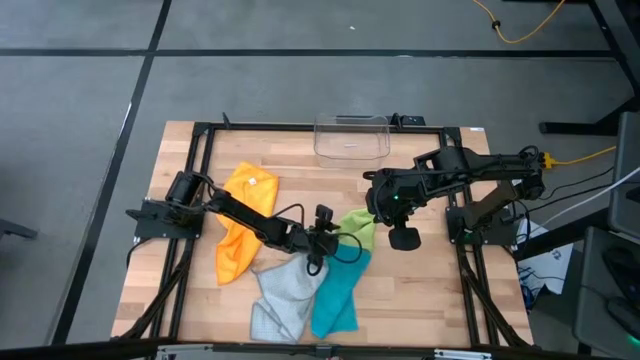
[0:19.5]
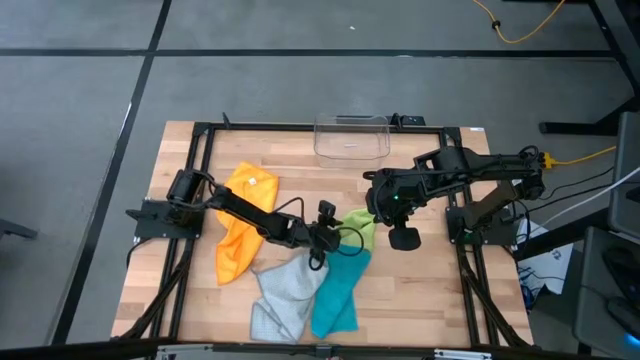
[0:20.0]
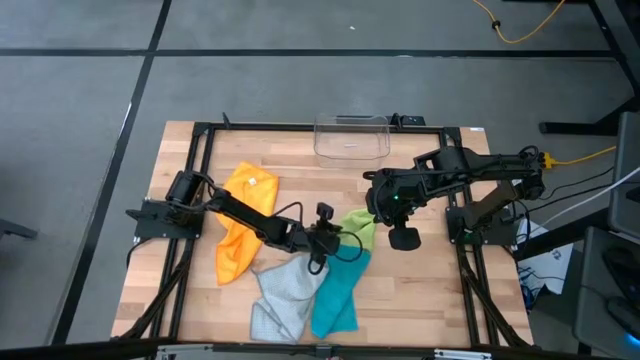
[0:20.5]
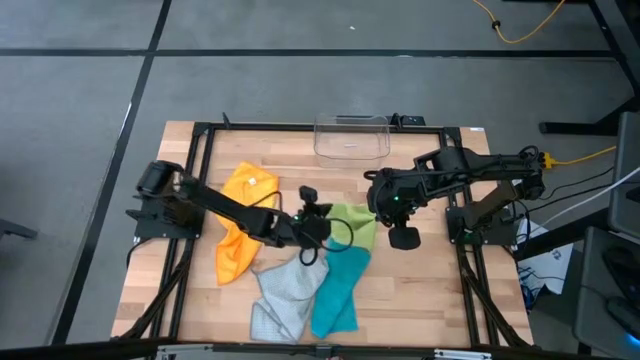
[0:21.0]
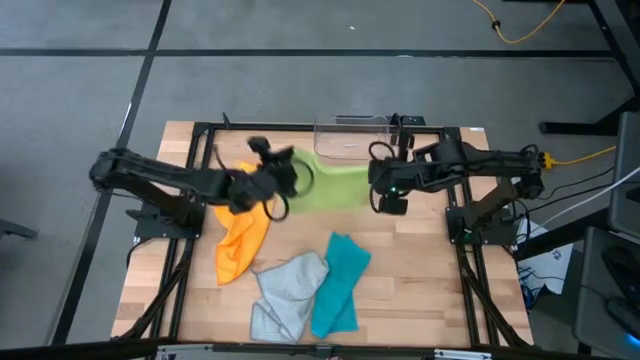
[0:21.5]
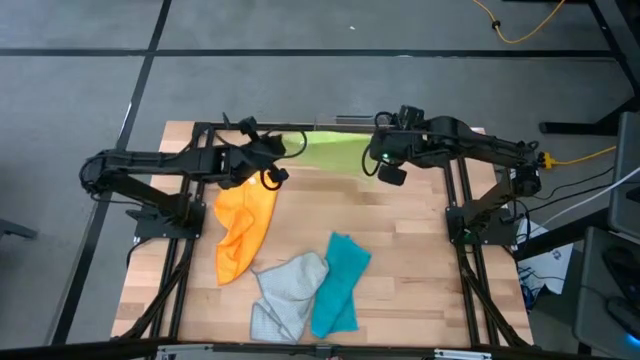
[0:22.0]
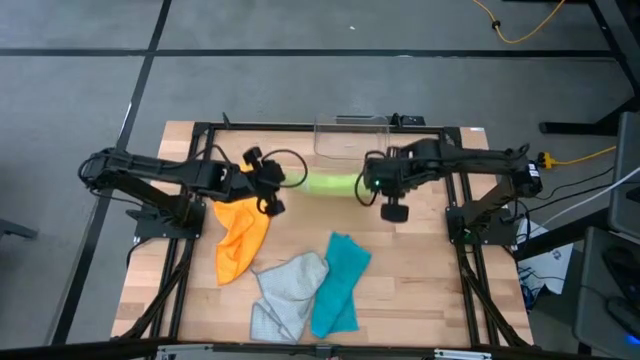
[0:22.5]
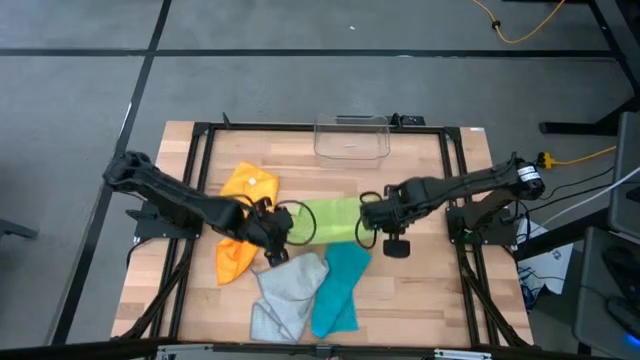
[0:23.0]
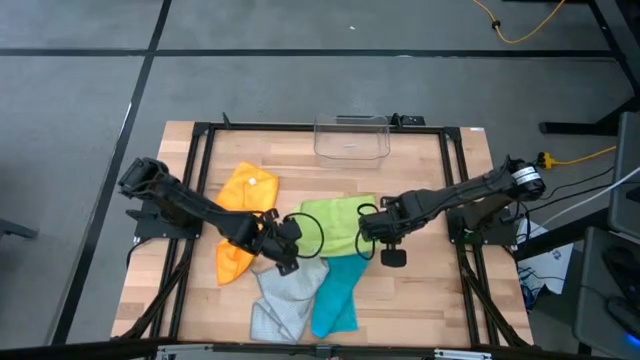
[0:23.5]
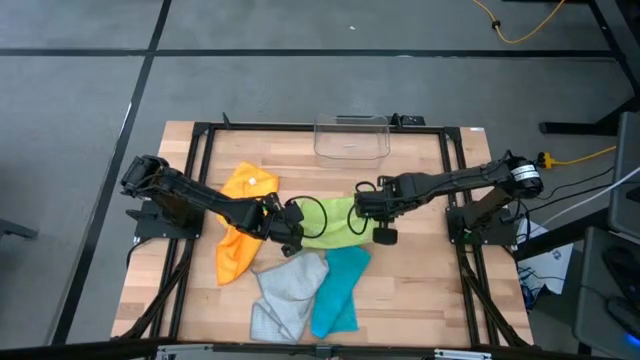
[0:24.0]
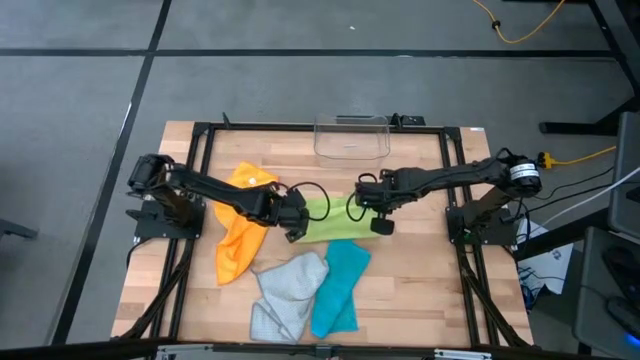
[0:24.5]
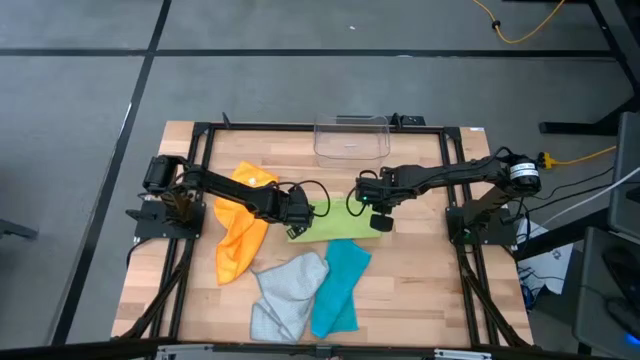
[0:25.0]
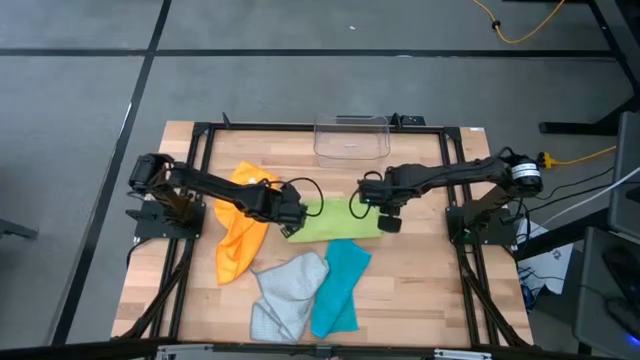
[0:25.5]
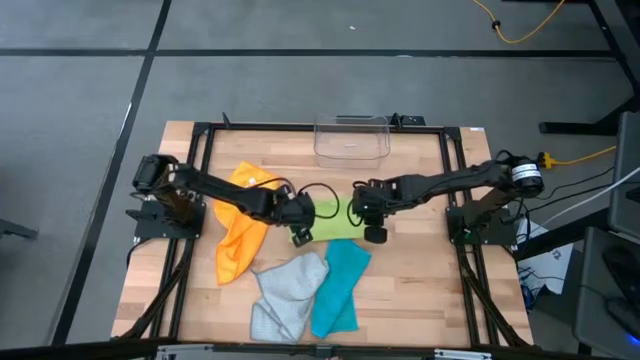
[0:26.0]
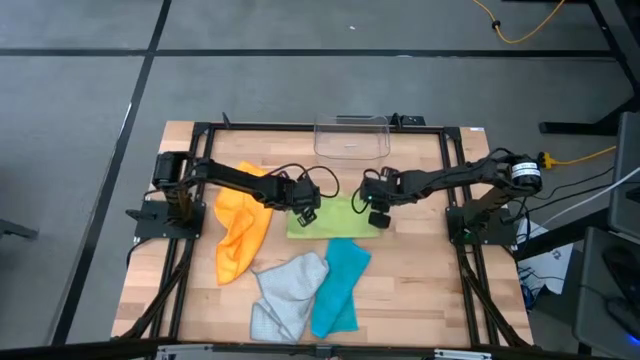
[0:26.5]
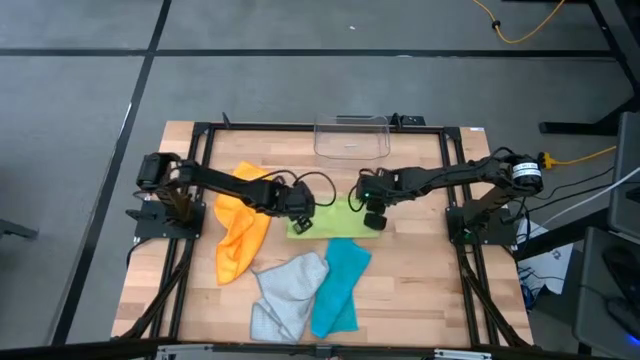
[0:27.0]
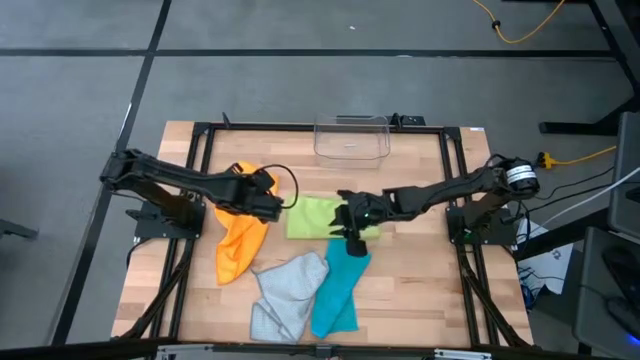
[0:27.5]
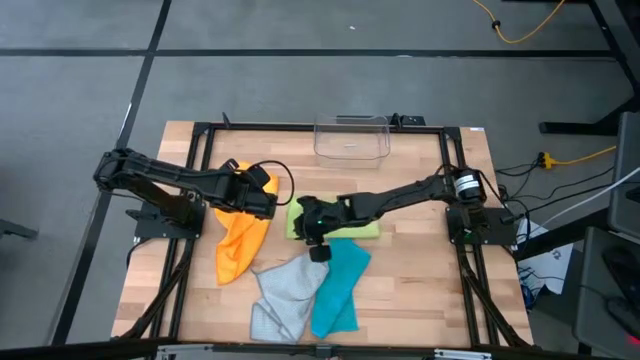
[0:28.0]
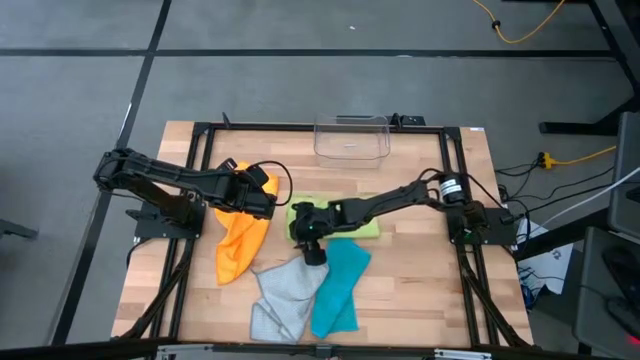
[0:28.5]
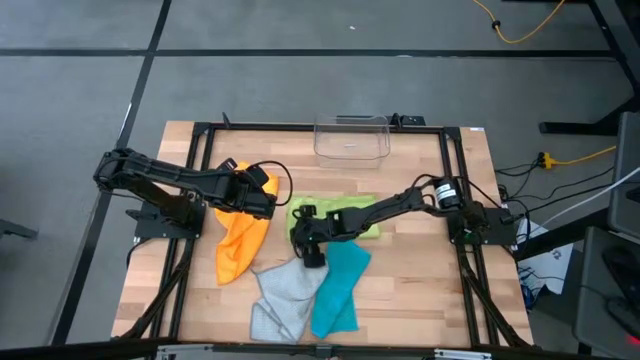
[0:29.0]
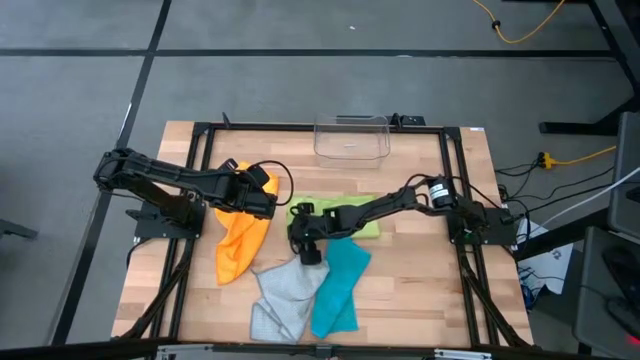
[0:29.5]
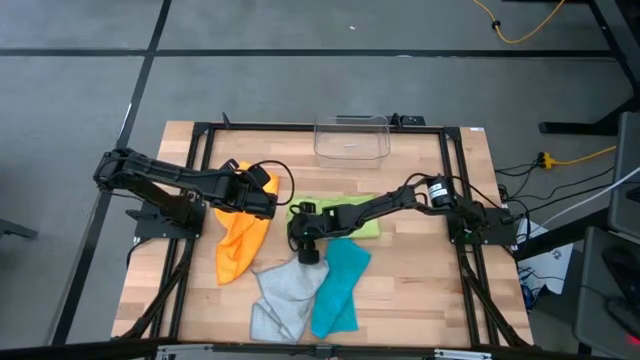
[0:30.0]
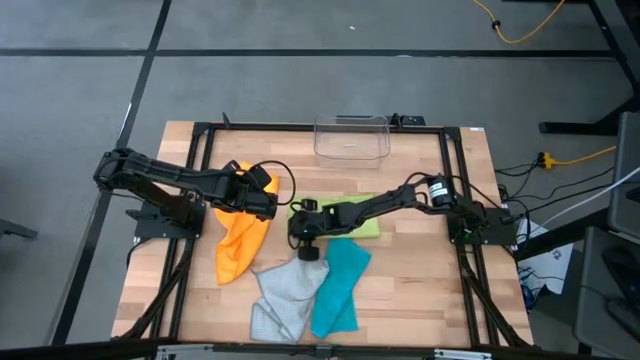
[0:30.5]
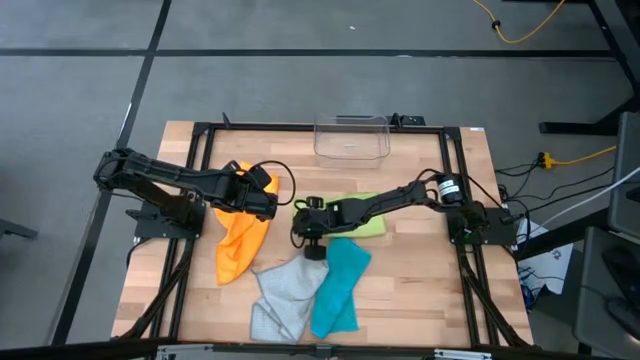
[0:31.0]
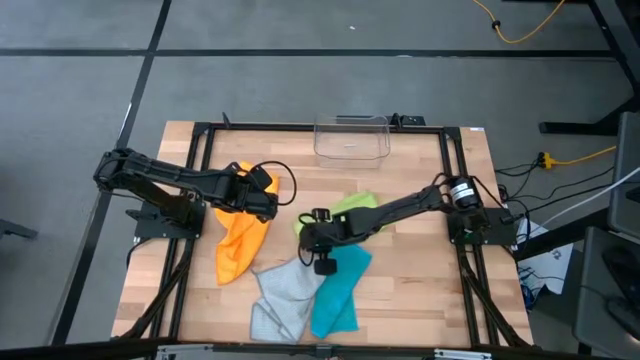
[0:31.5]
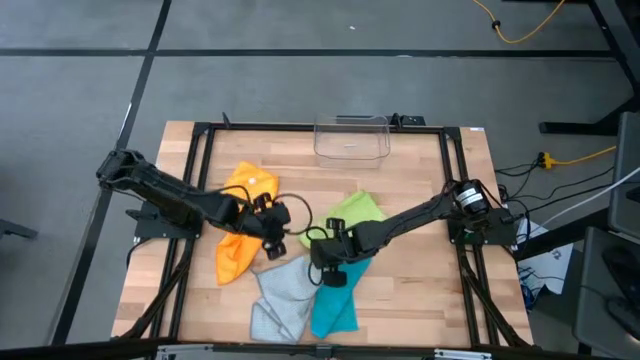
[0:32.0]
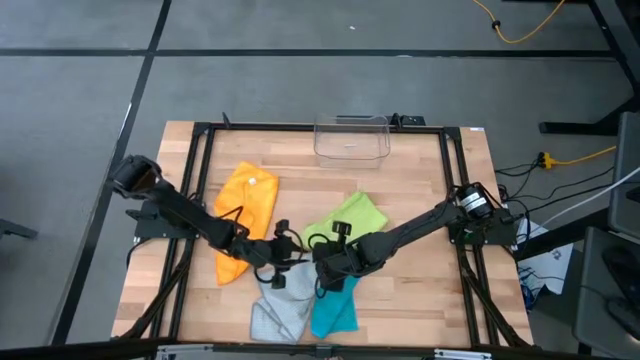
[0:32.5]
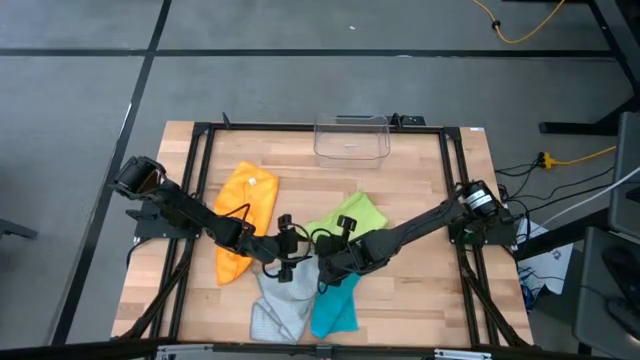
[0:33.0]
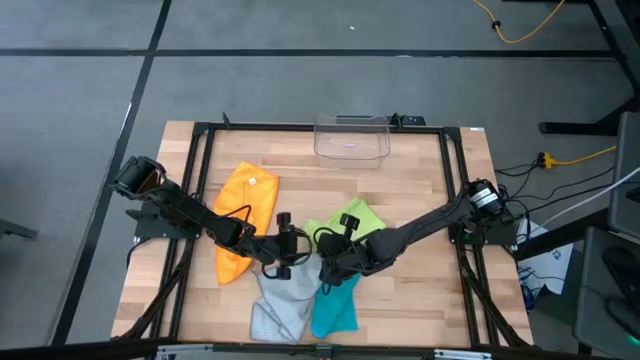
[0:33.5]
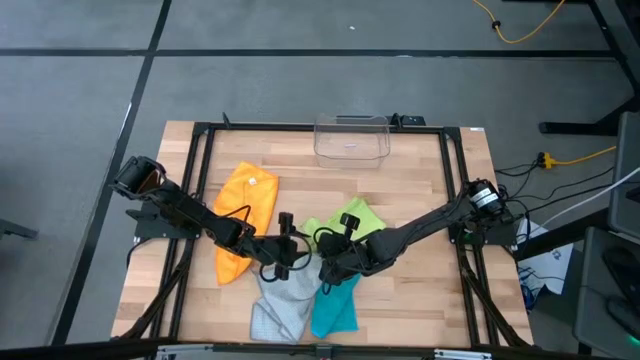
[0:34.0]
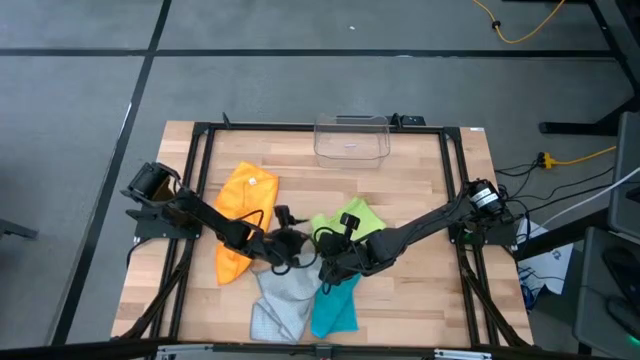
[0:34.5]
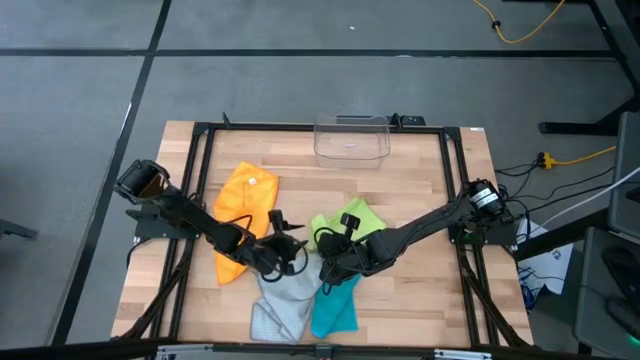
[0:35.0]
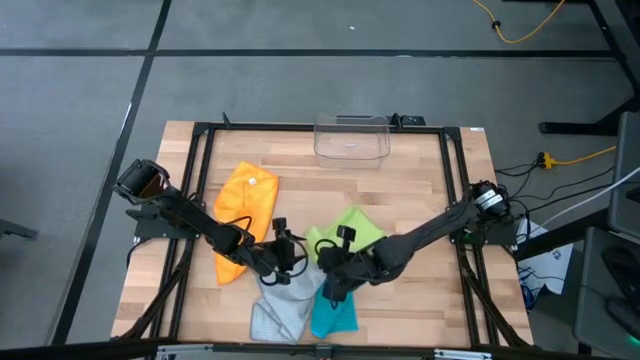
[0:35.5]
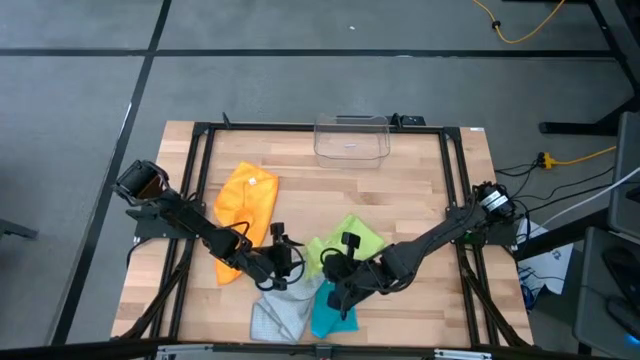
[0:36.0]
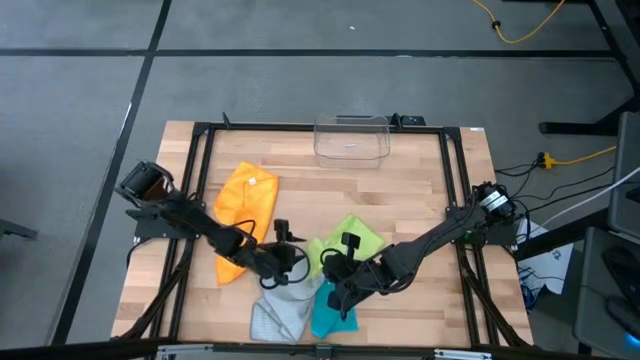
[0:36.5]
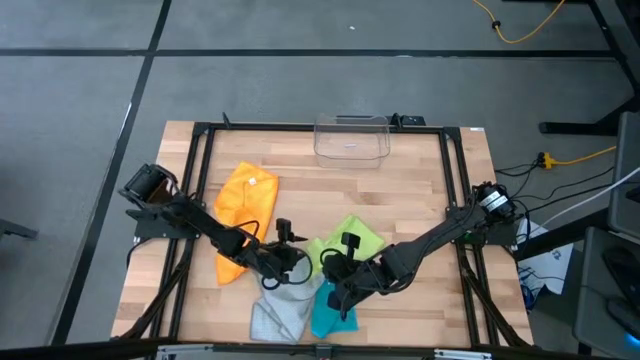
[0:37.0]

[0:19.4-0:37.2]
Task: Fold microfiber towels
Fold the green microfiber towel
